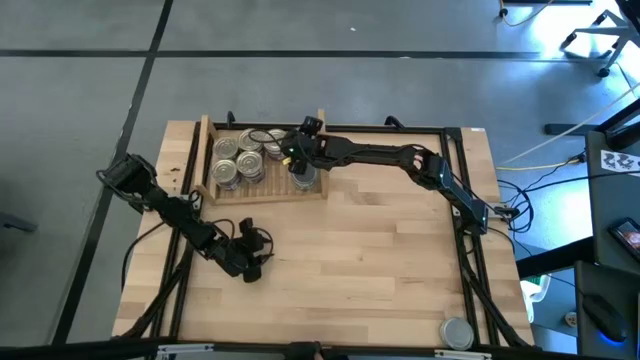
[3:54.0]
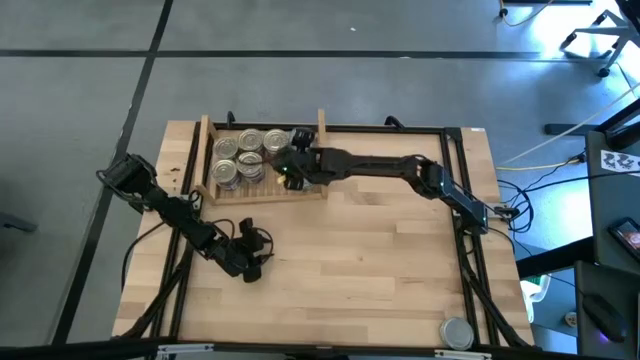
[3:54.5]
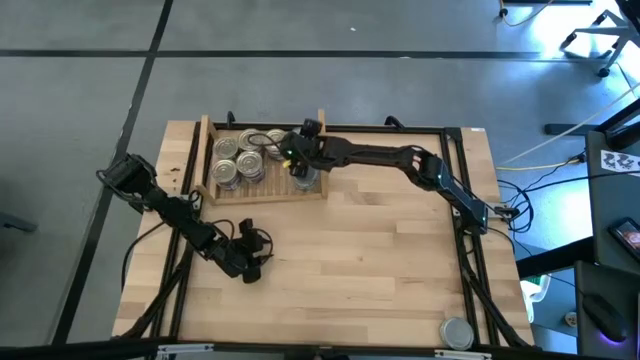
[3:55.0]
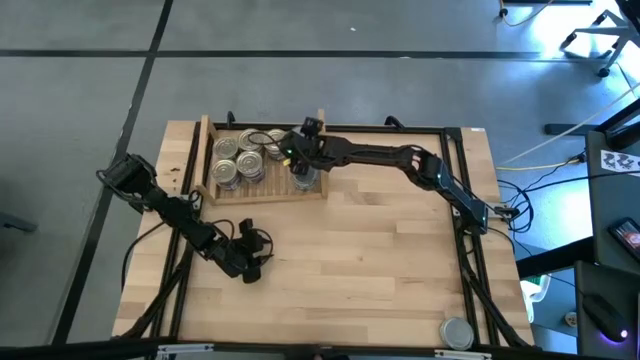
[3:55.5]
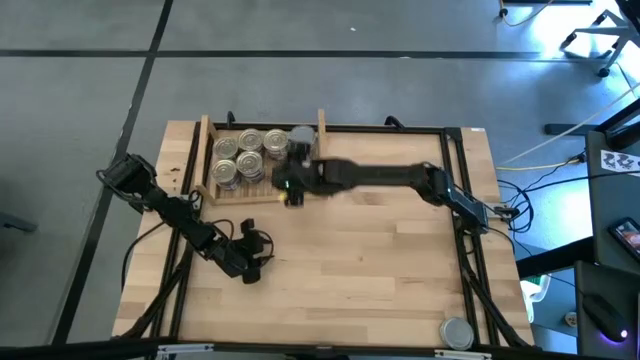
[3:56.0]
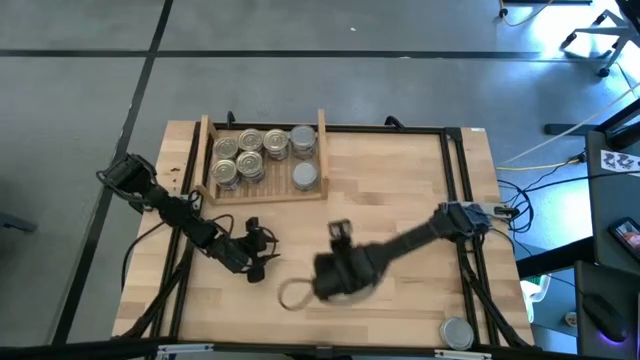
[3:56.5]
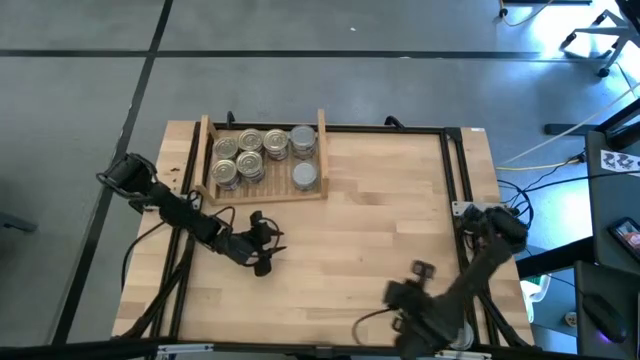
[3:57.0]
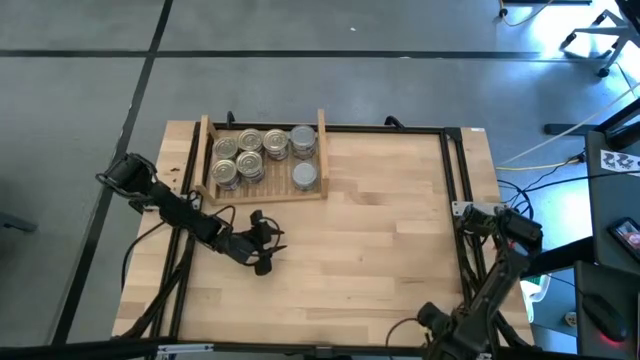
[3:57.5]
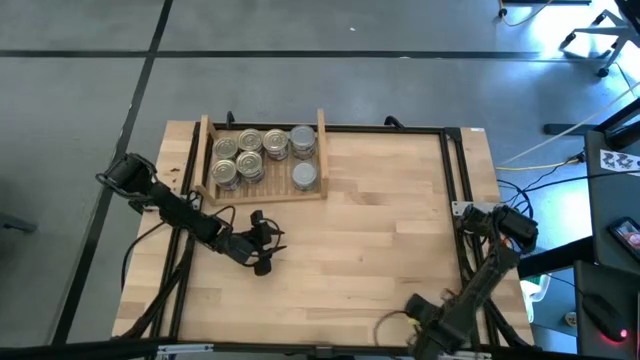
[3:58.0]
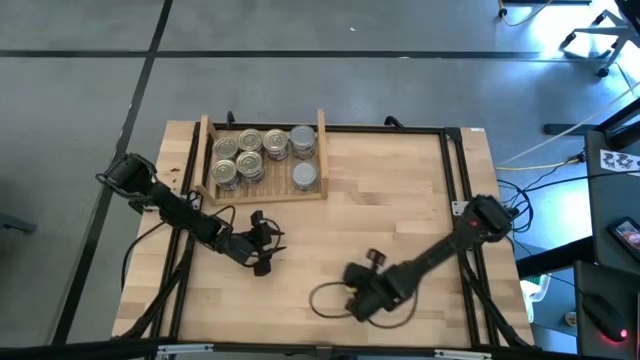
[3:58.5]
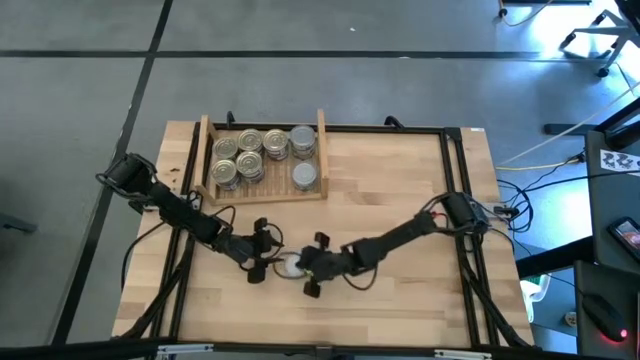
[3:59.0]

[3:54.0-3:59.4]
Task: Stack canned seafood by type on shelf
Move the green tuna can from the bottom right to the center

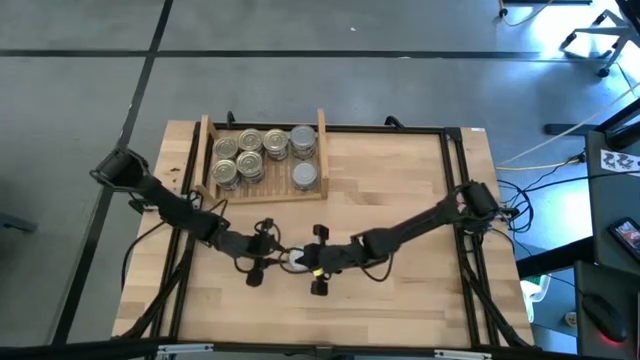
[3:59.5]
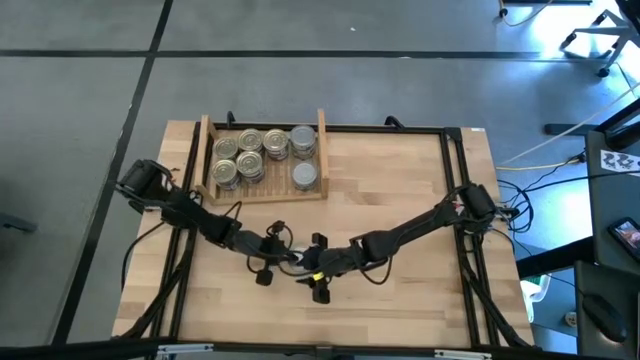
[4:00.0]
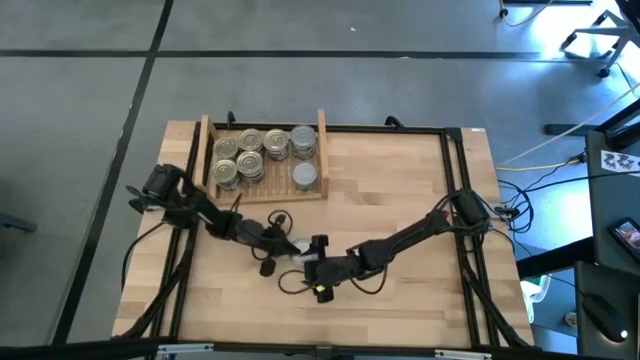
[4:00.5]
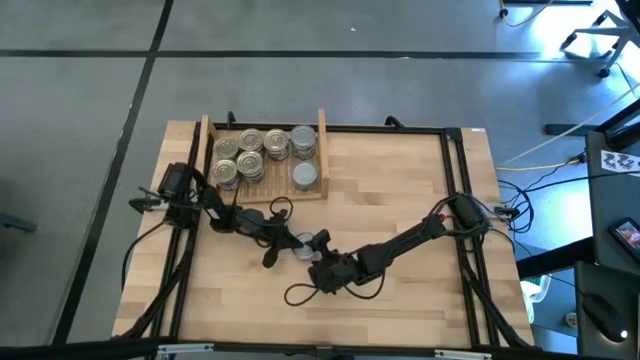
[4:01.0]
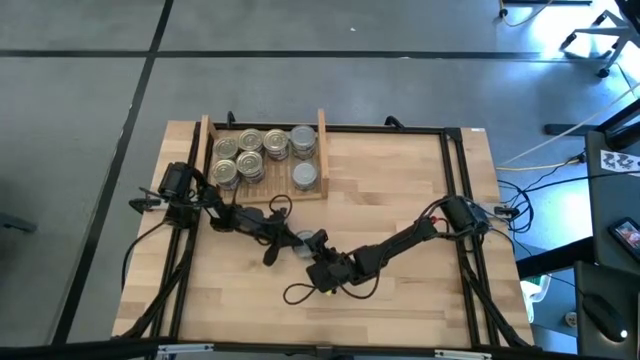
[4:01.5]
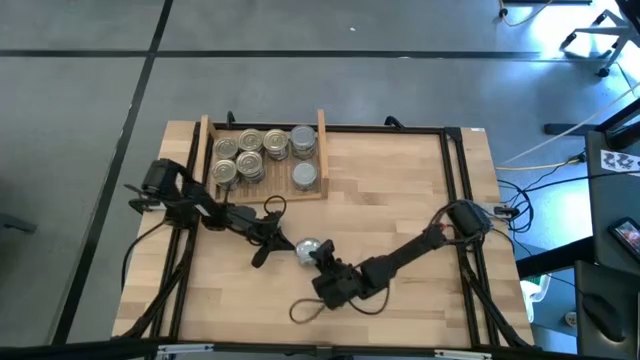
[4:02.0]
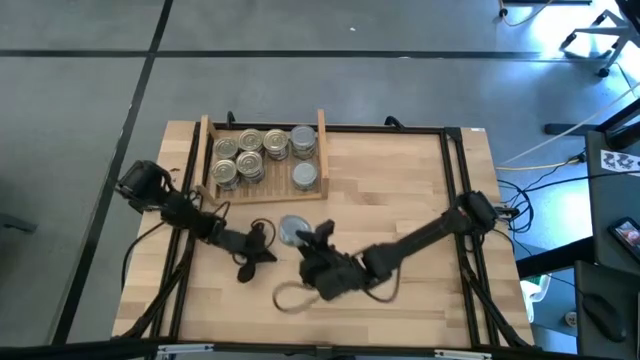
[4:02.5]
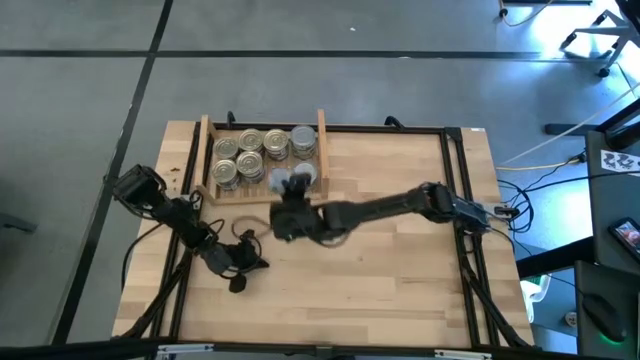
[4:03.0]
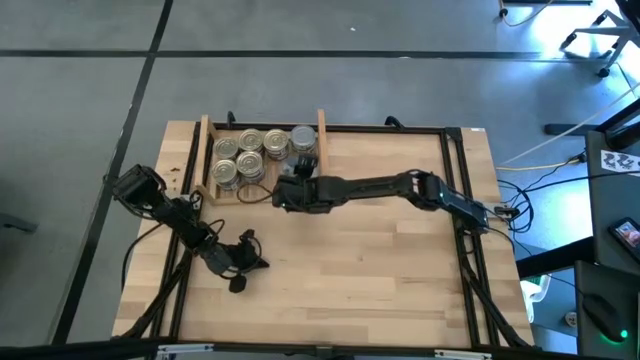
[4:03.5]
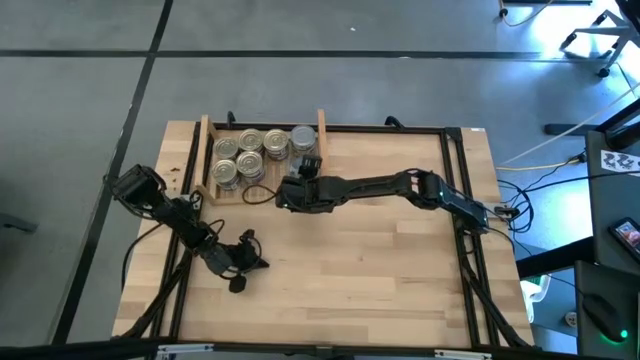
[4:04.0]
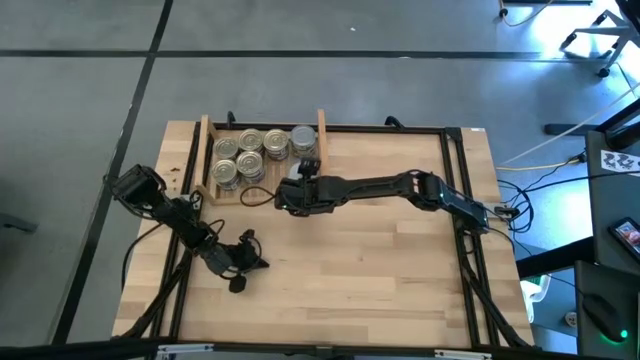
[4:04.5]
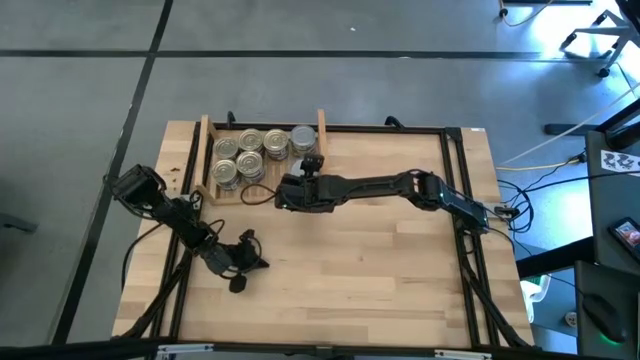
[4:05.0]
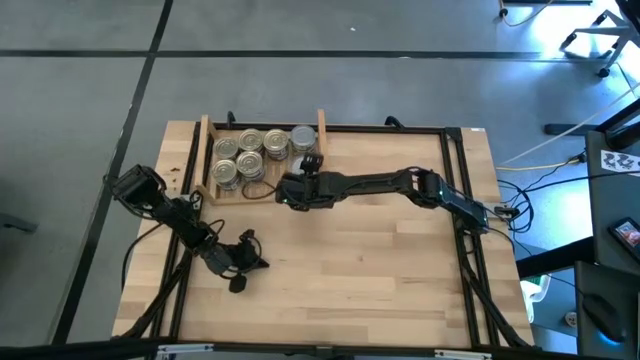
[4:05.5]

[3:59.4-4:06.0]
Stack the green tuna can on top of the other green tuna can on the shelf

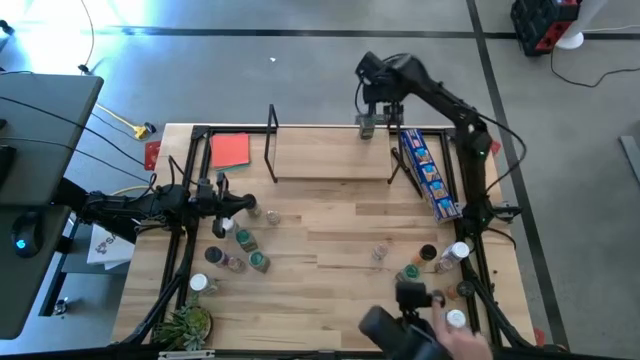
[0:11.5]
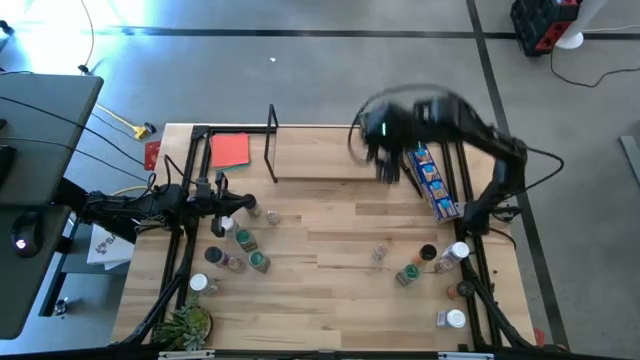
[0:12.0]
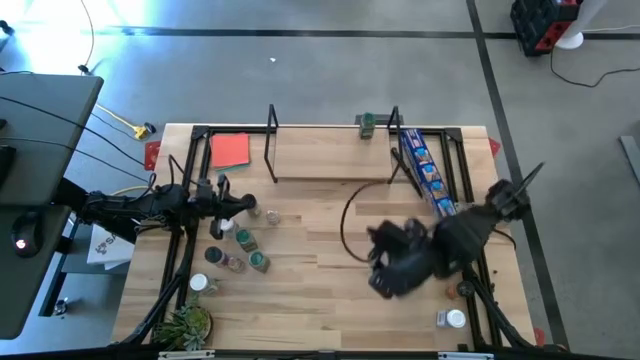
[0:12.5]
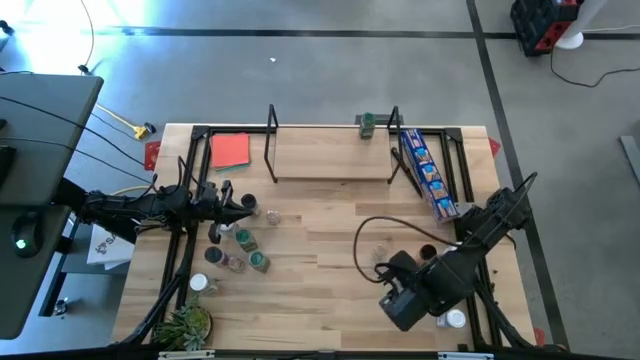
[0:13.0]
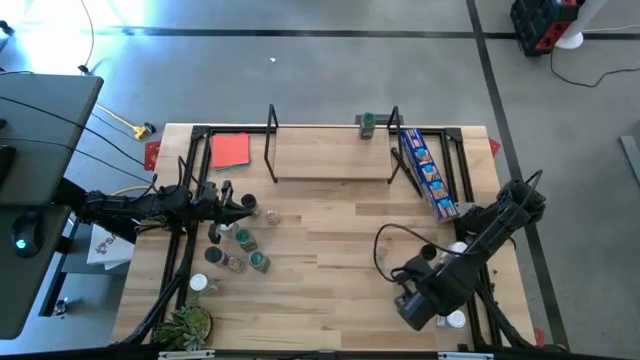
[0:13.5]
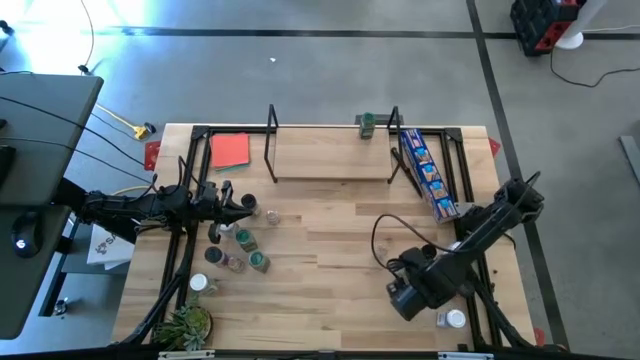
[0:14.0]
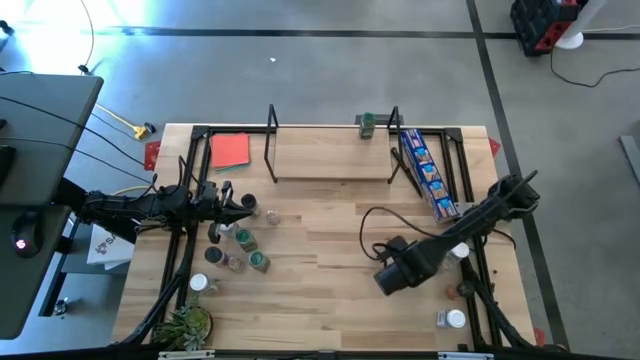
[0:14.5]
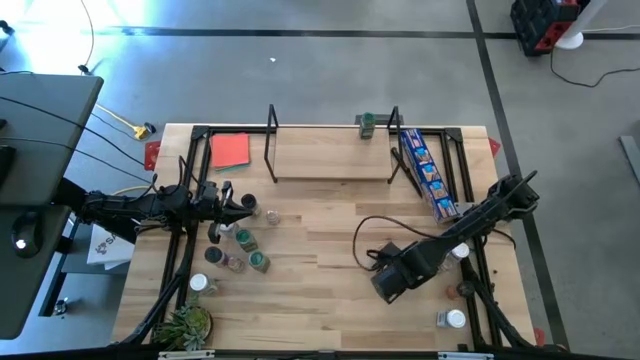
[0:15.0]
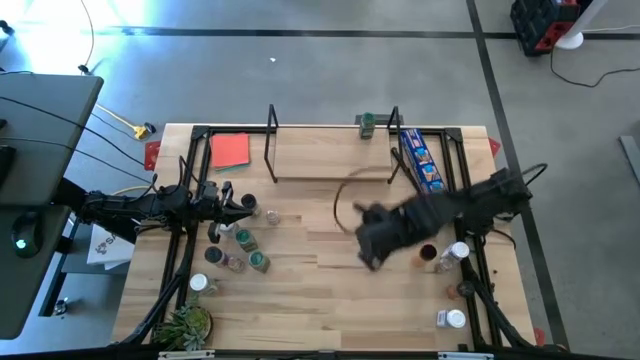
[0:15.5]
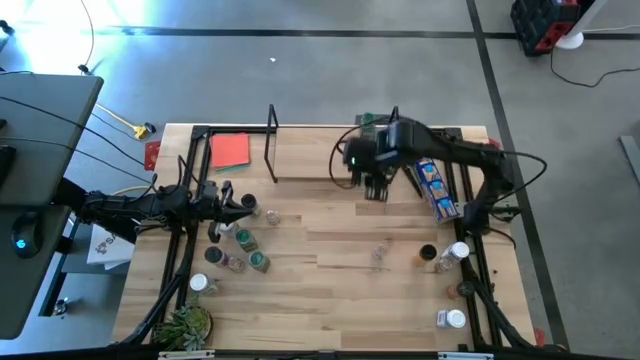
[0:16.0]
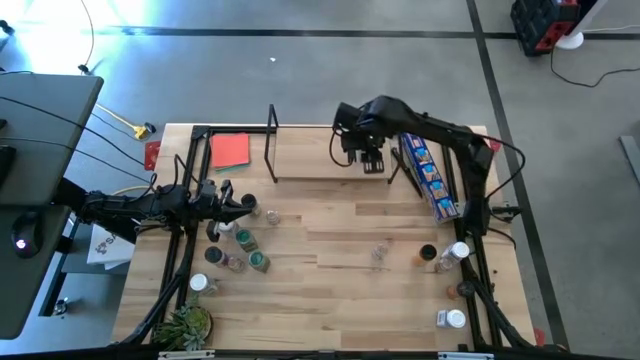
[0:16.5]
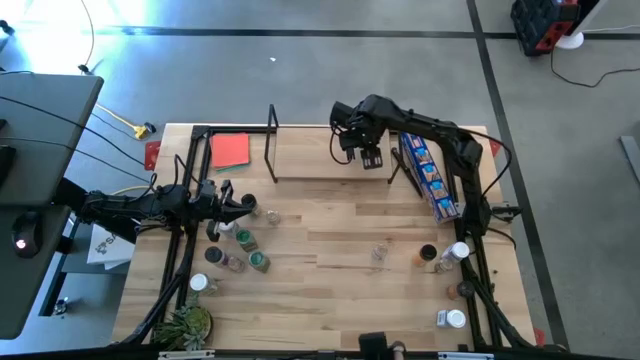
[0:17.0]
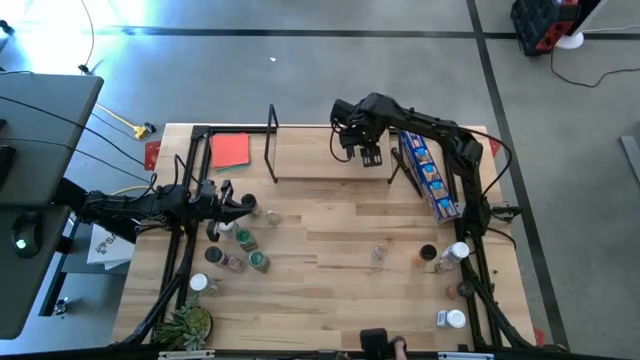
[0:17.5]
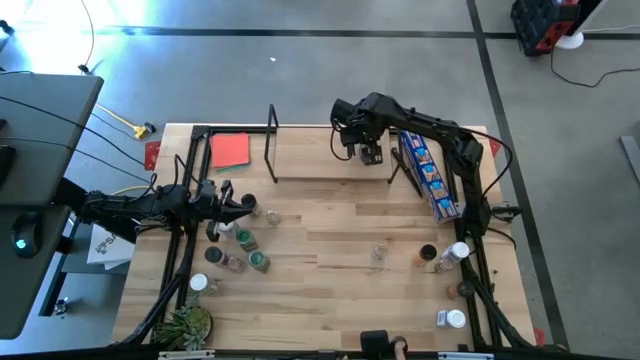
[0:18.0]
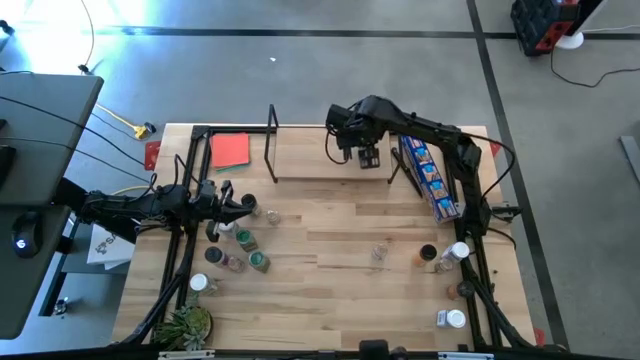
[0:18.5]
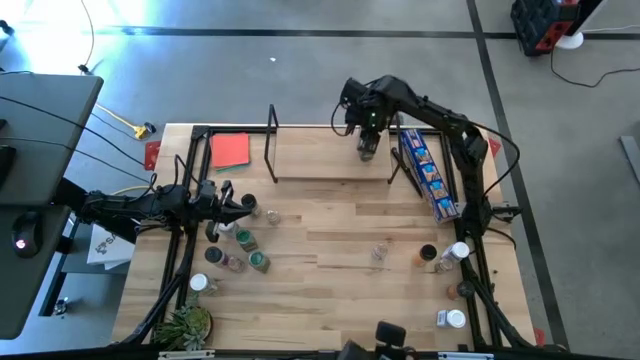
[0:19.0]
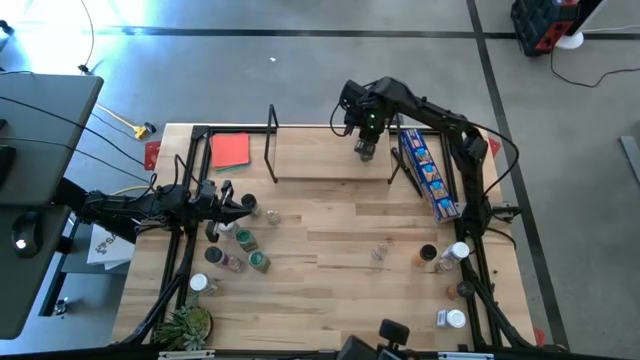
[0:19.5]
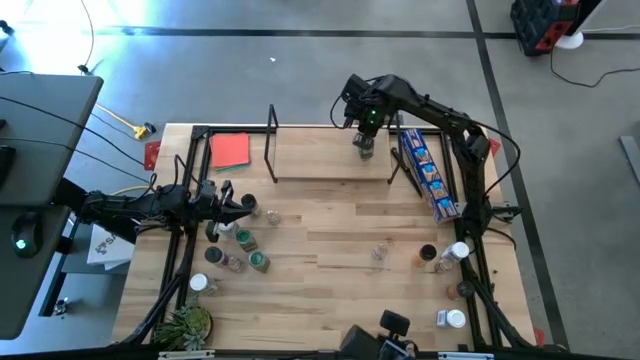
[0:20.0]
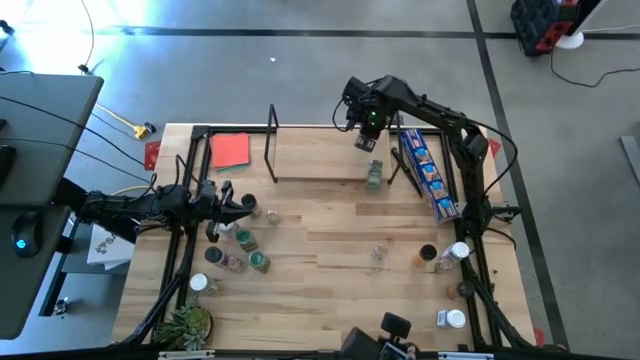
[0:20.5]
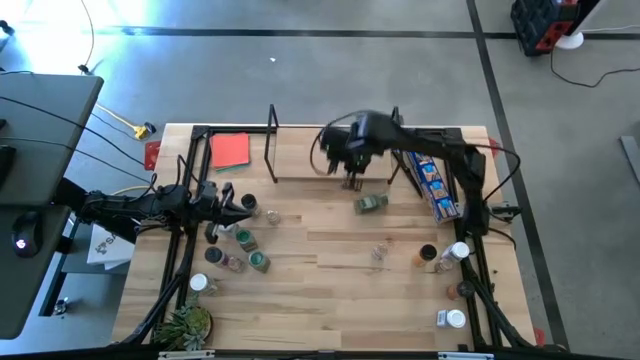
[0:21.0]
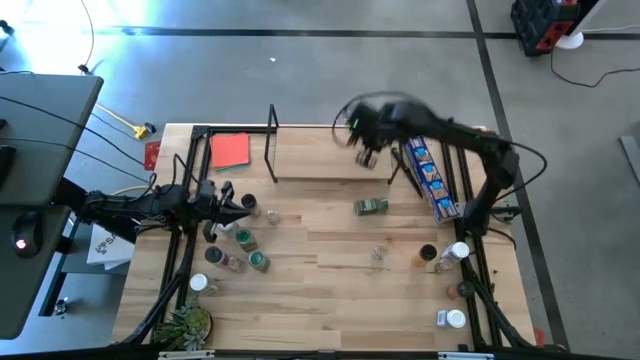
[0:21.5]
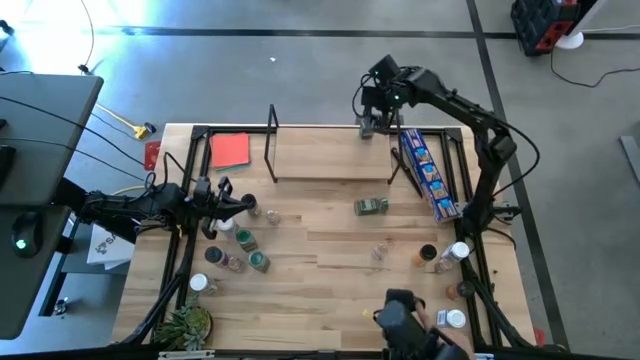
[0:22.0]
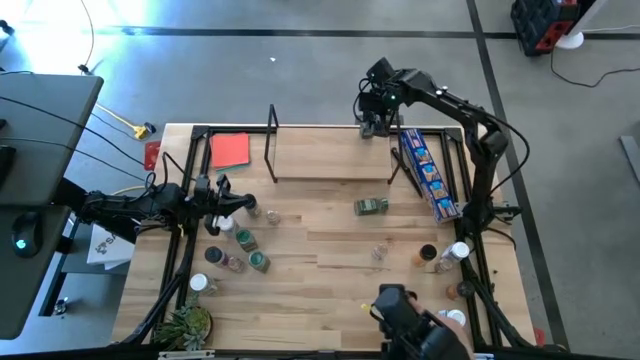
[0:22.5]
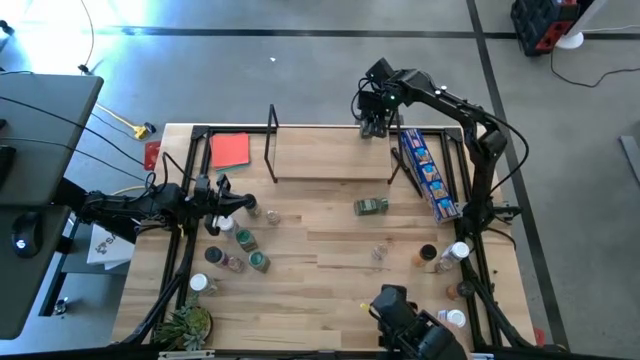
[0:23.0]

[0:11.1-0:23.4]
Task: Shelf spices
Put the green seasoning bottle on the shelf aligned with the other green seasoning bottle
